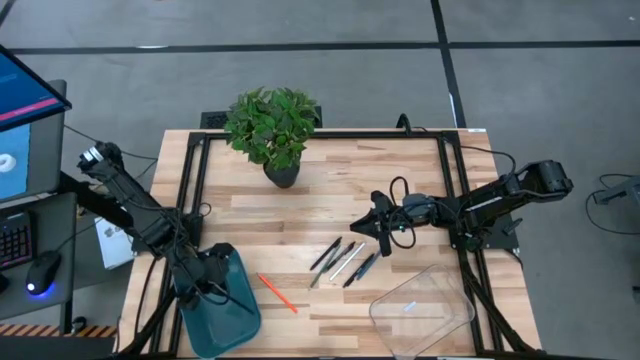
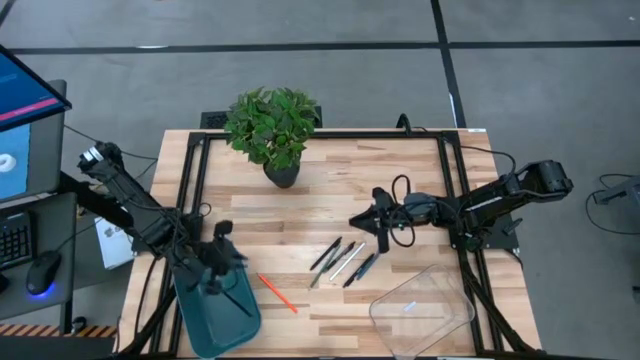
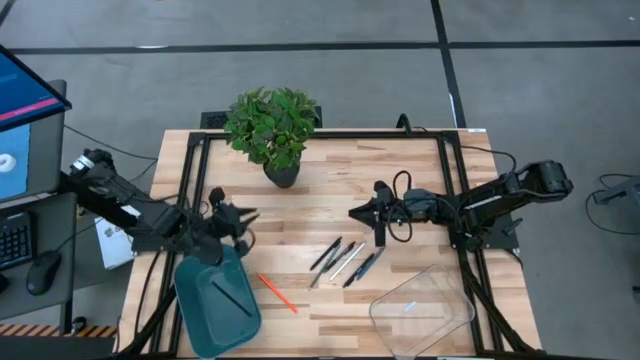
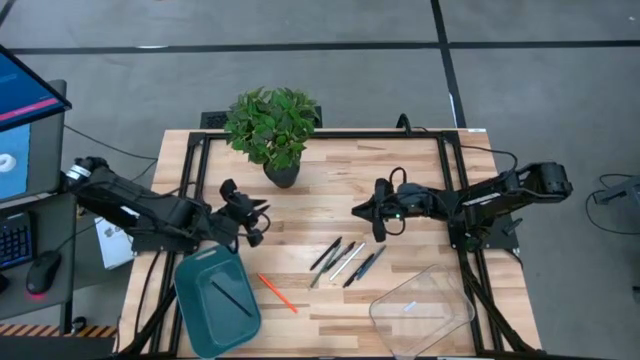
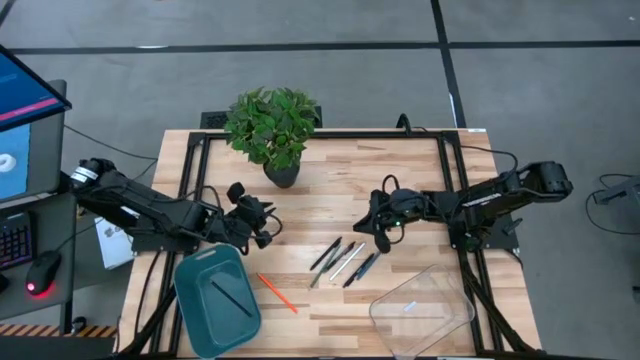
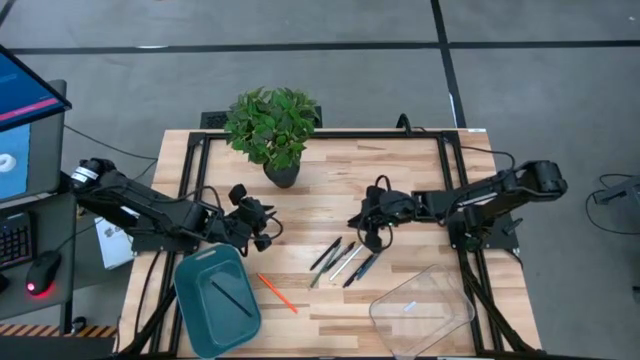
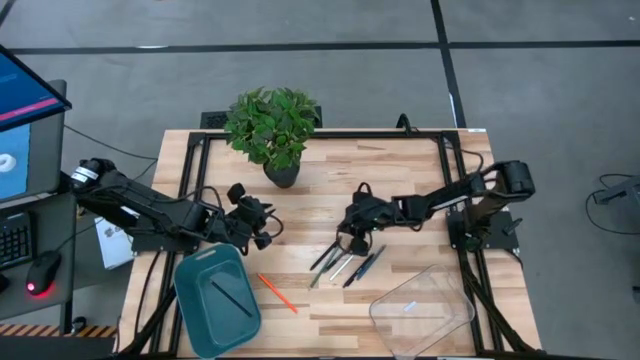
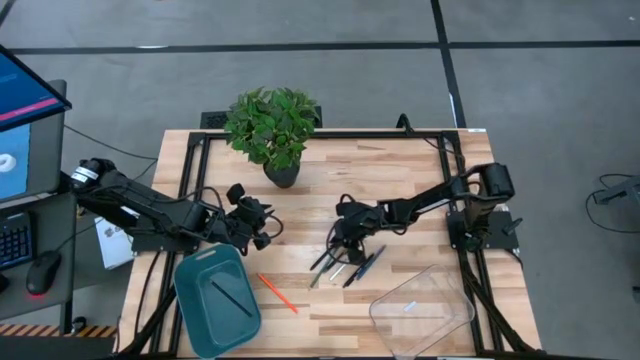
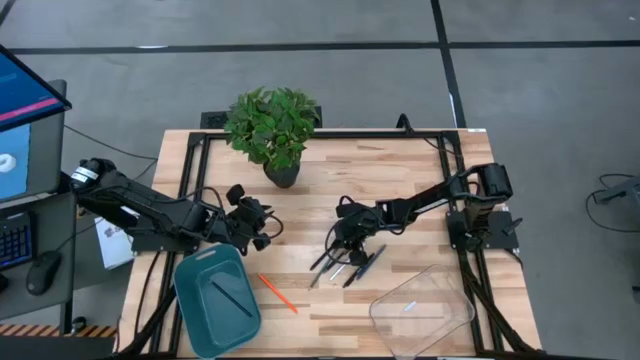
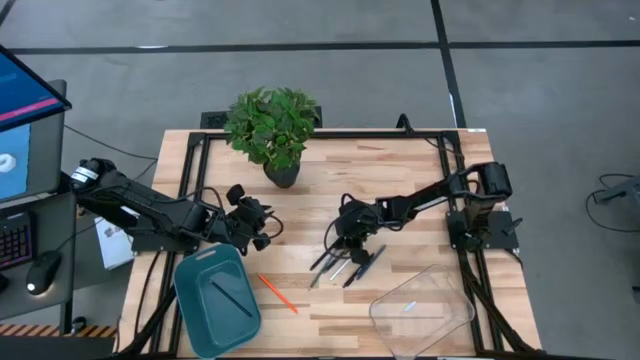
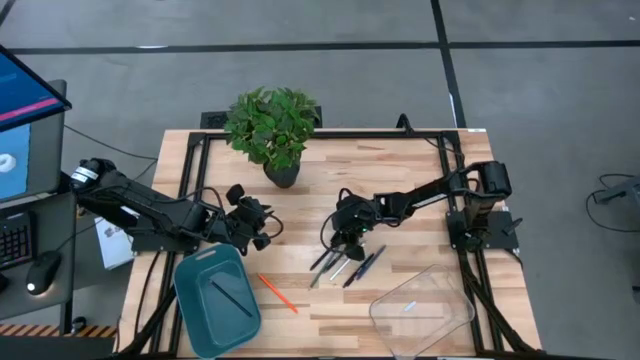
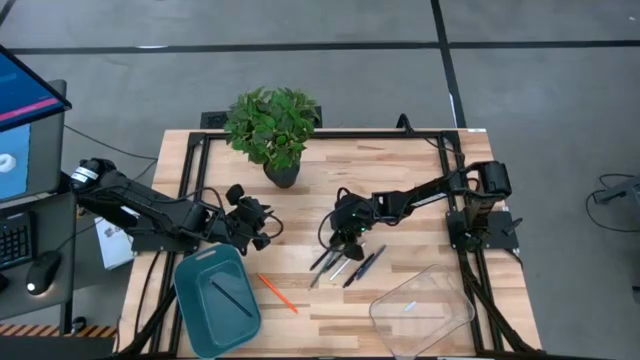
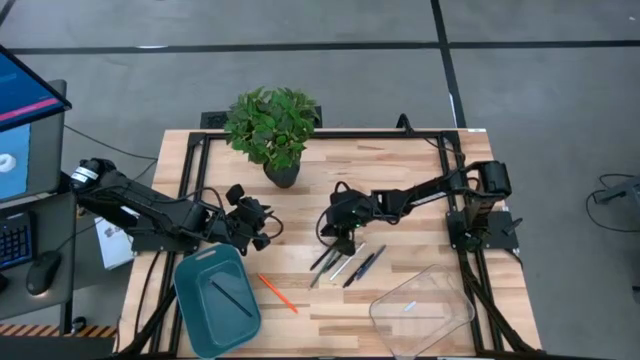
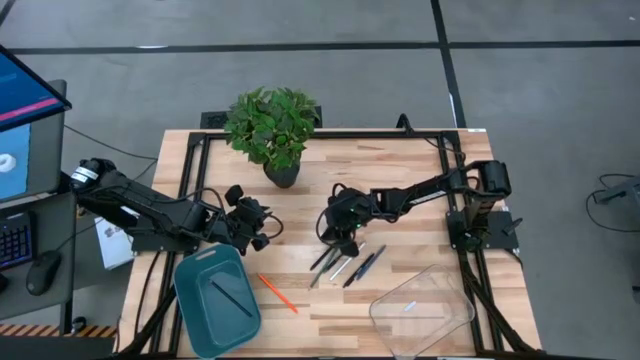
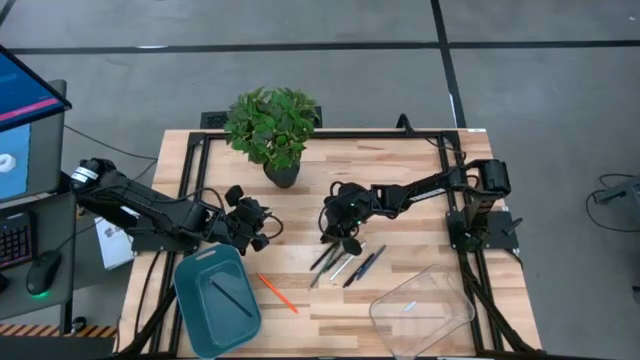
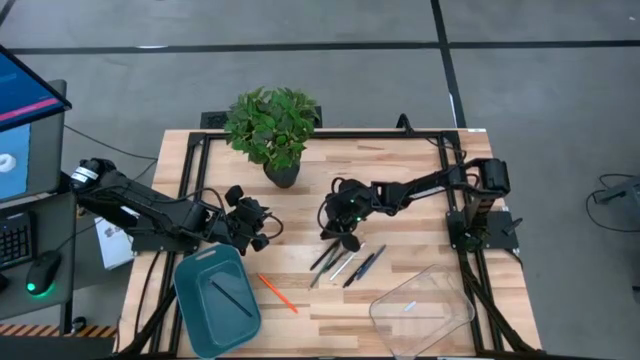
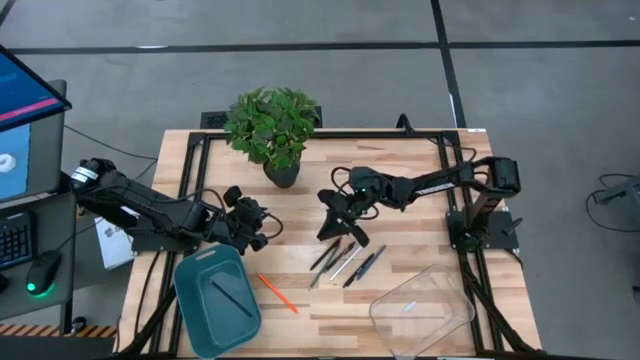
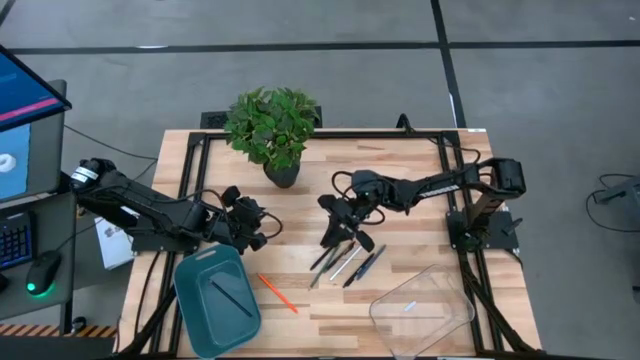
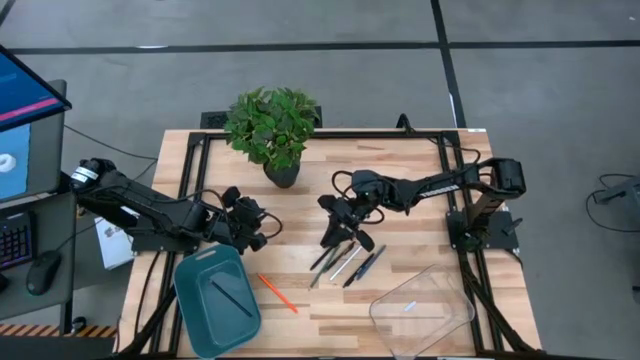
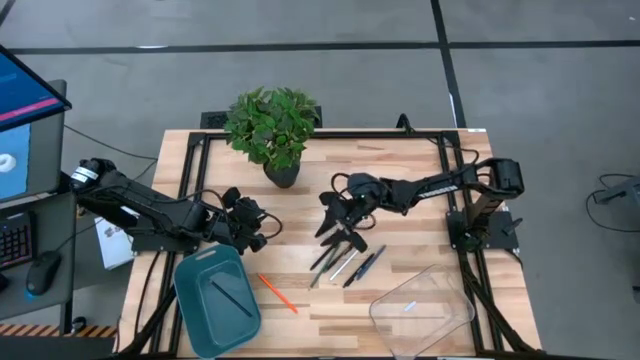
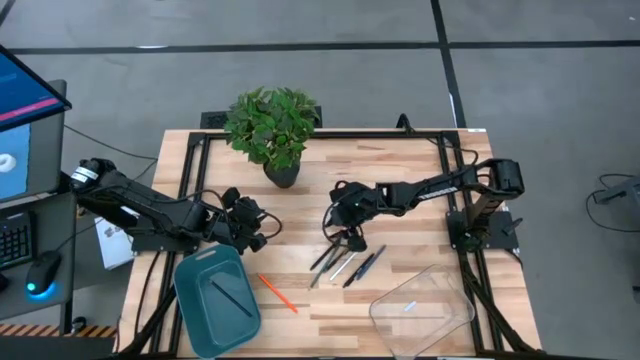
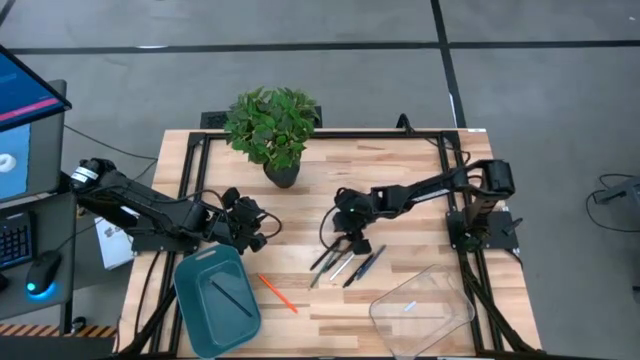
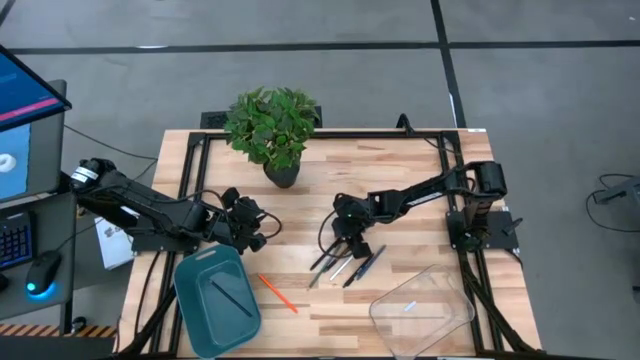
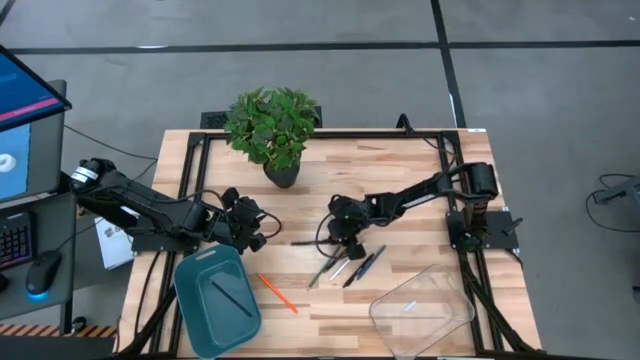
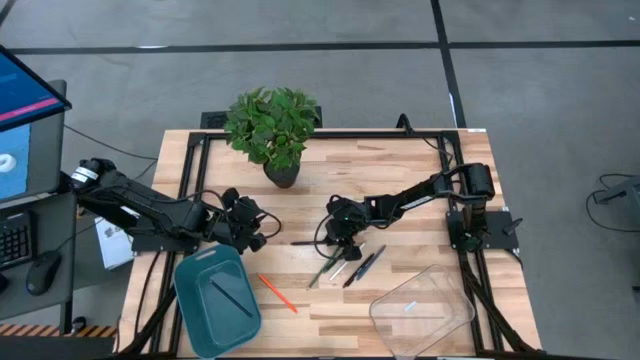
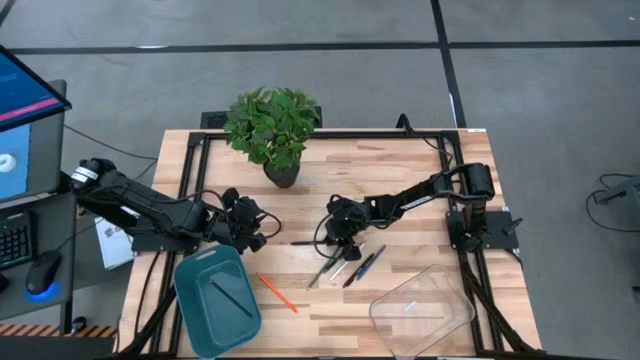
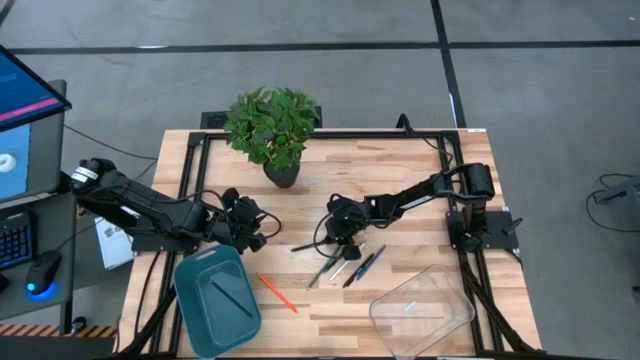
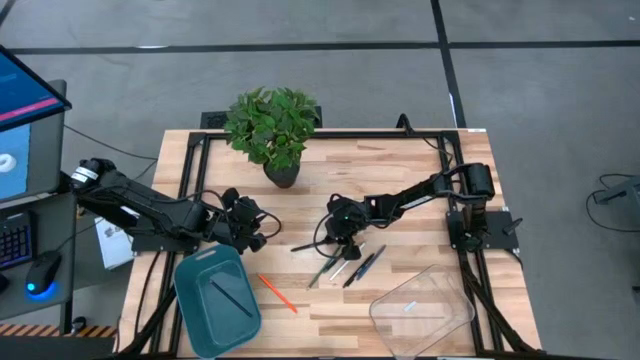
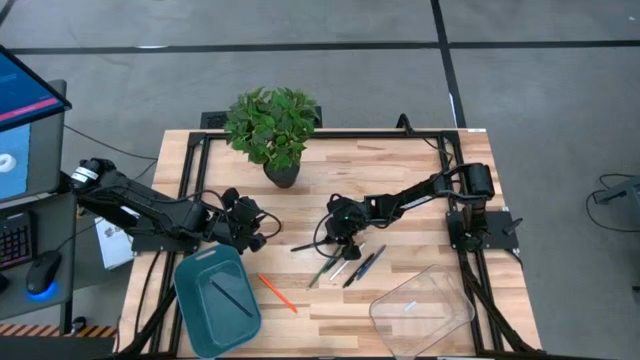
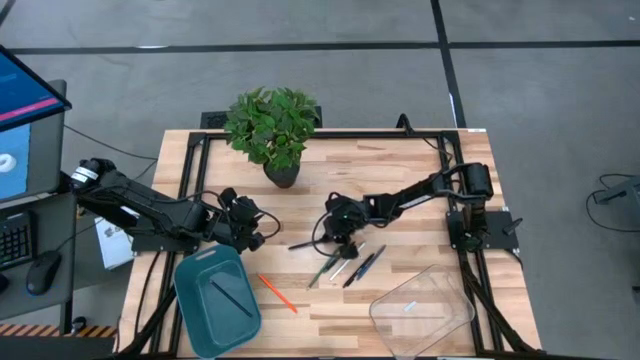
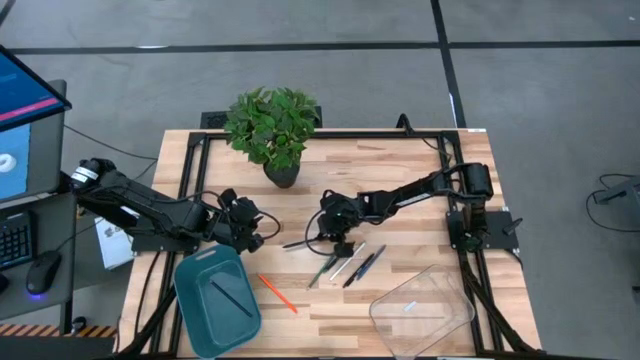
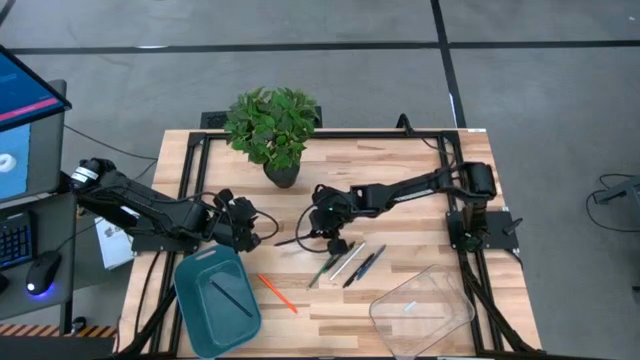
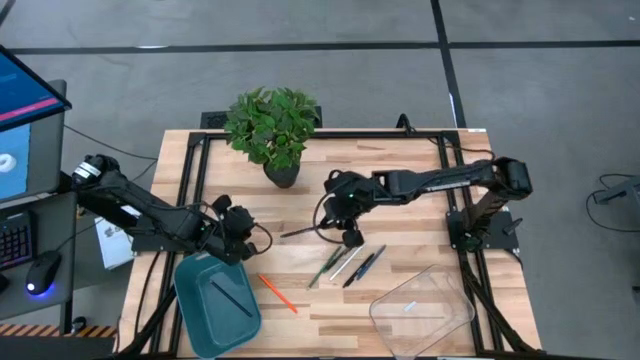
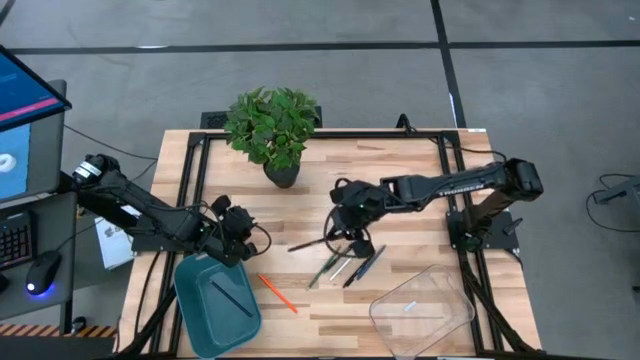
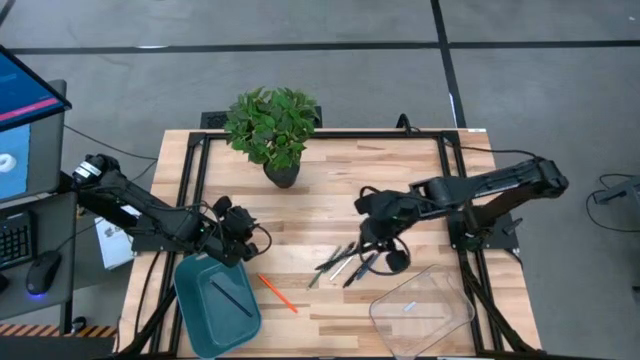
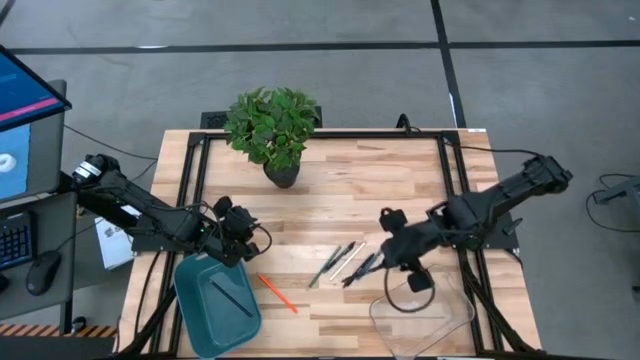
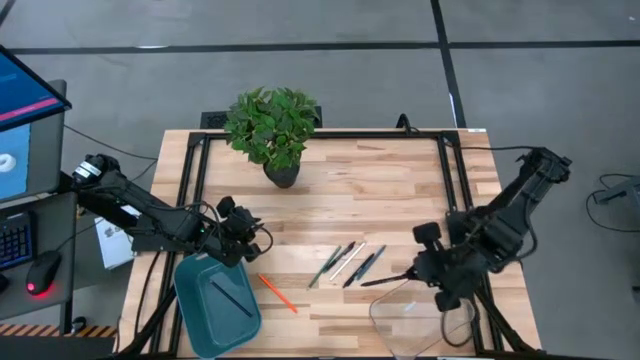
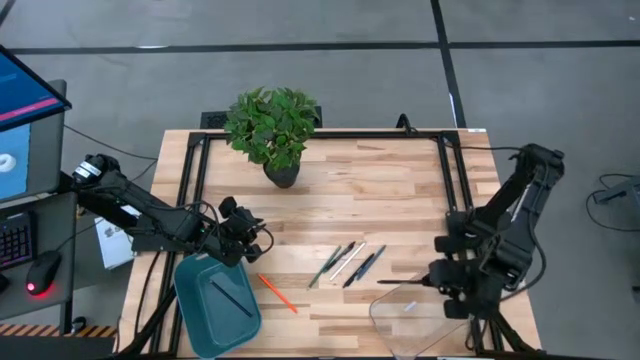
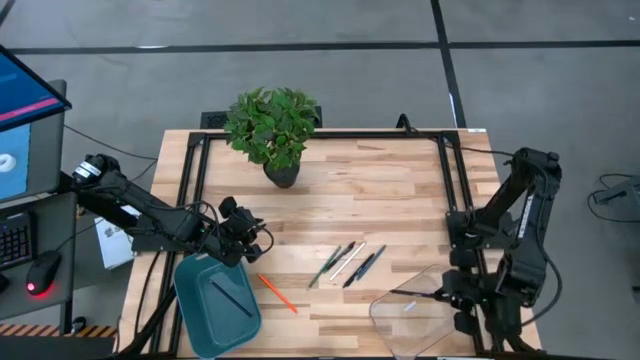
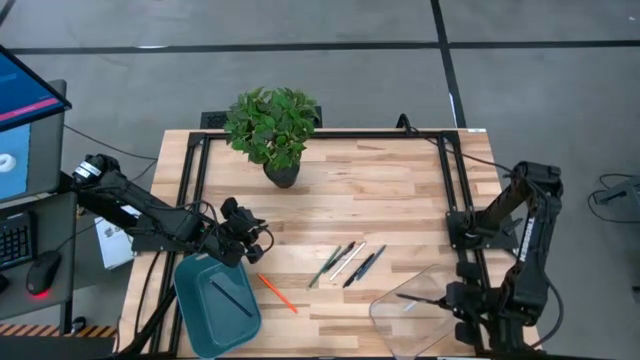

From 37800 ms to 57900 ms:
Task: Sort pens & pencils
Put the top black pen into the transparent bin

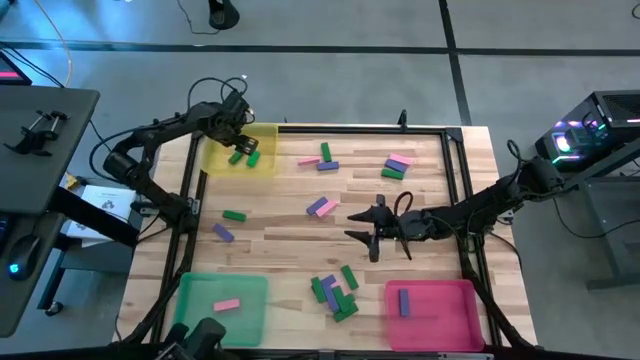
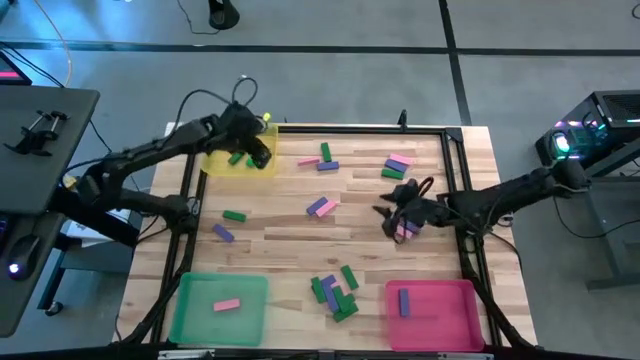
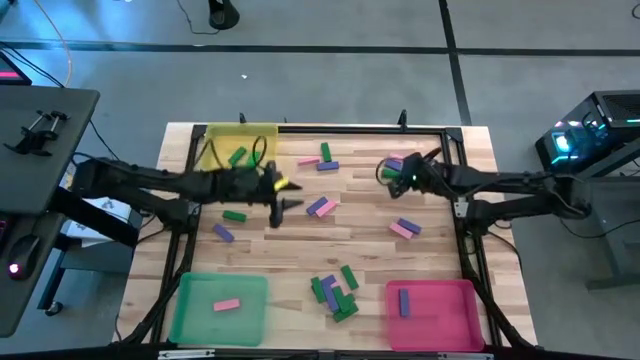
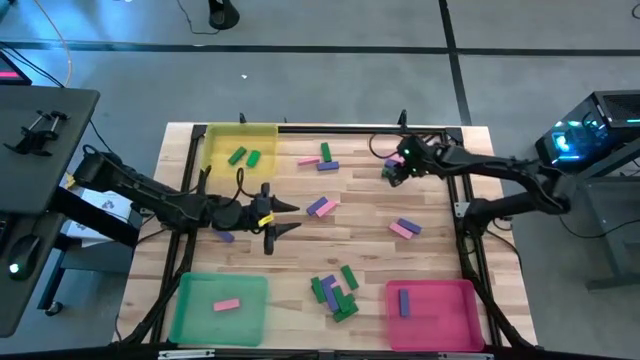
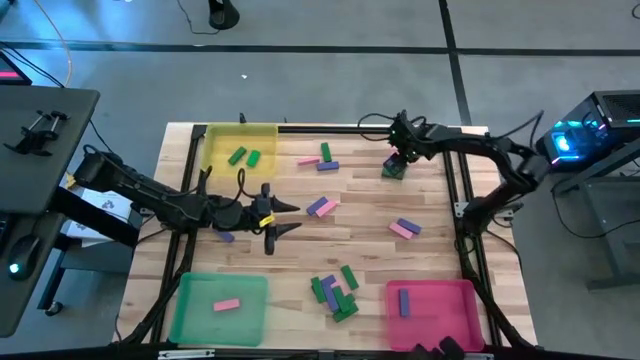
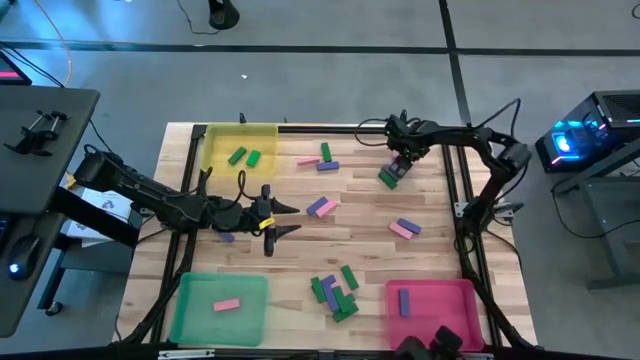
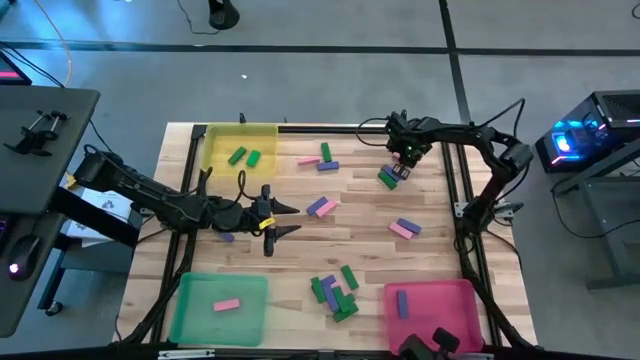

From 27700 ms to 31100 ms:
Task: Sort blocks
Put the pink block into the green bin
